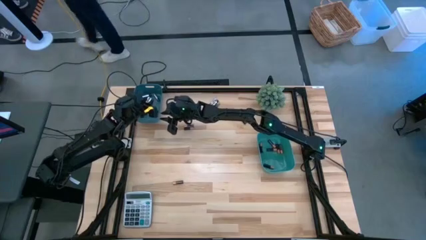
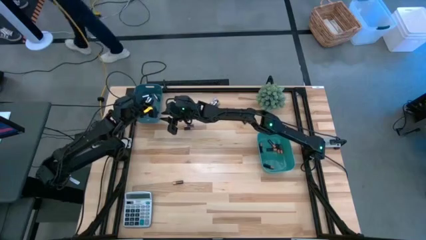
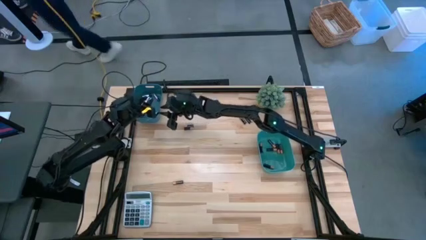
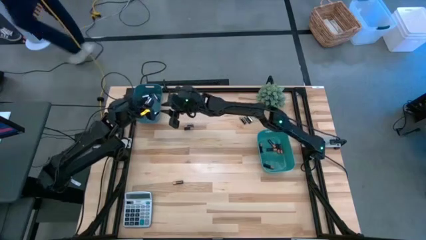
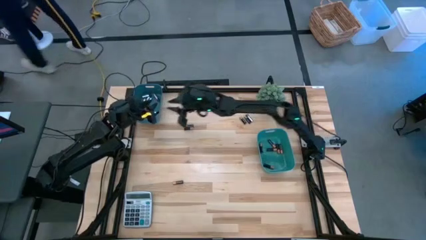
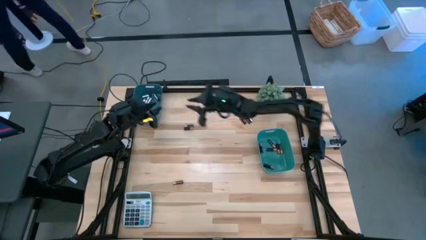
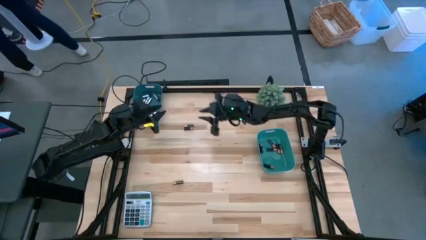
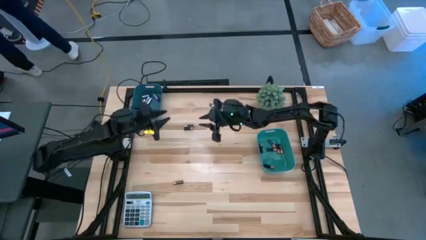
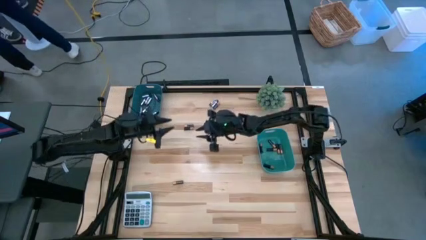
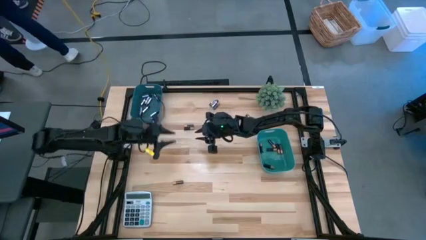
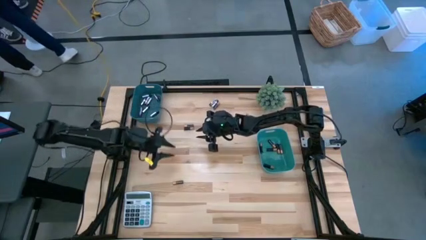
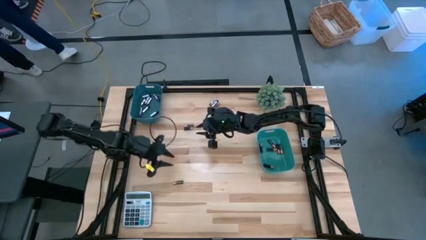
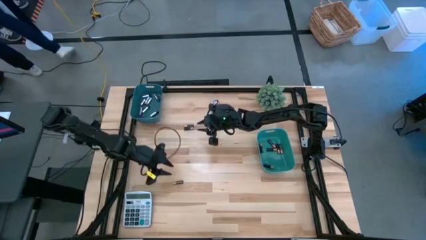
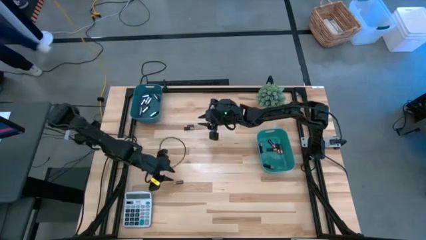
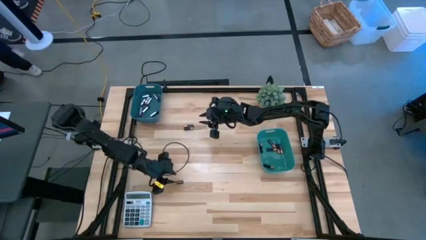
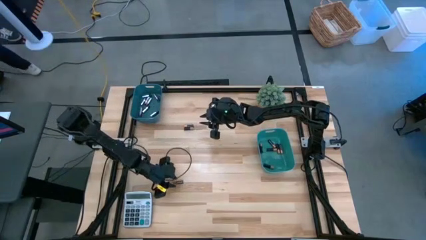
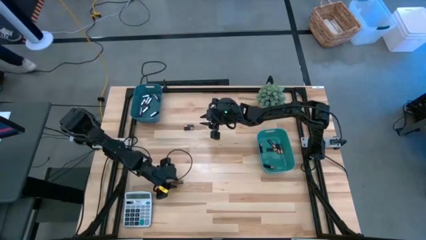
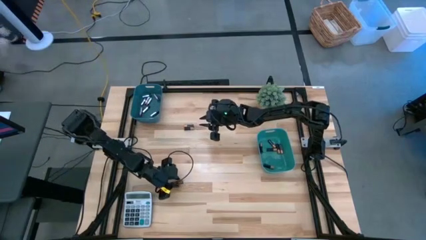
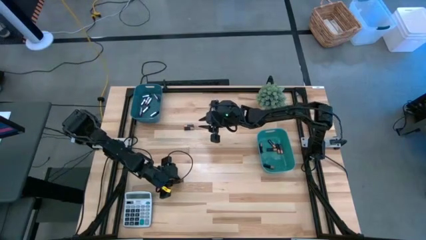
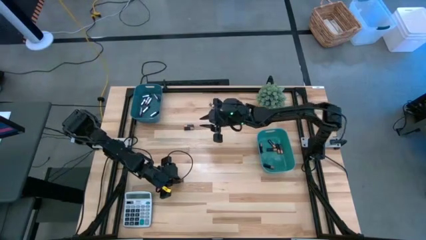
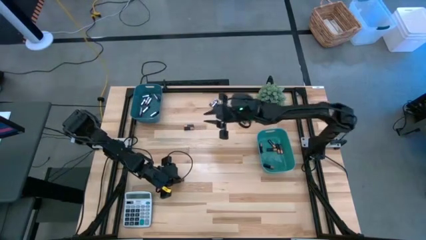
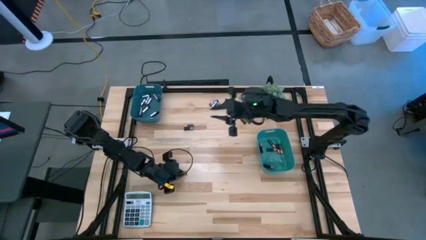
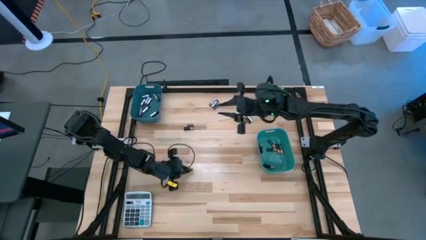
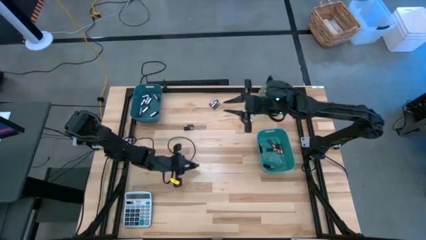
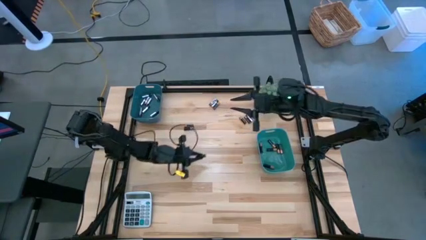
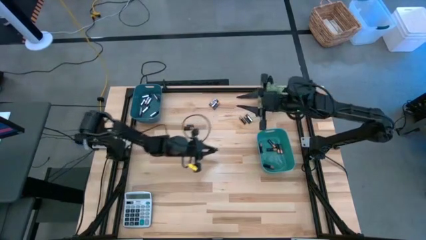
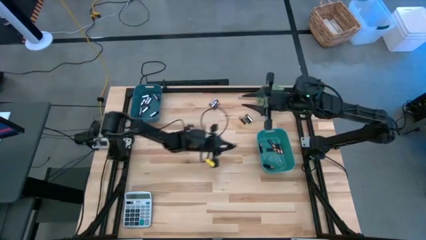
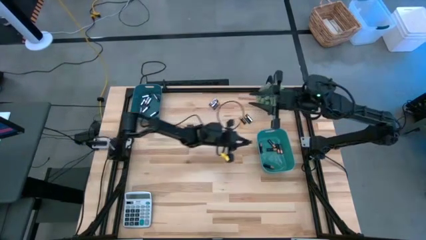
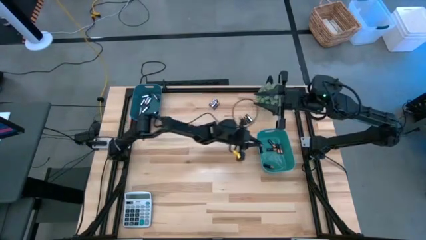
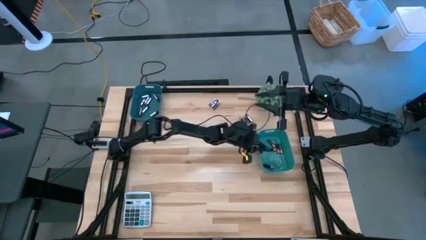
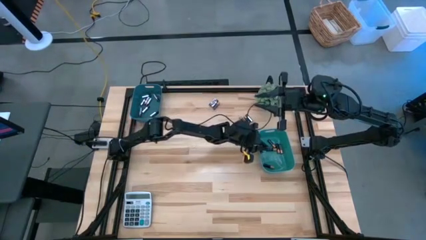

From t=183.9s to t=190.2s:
Task: Sort batteries
Put the brown-block battery into the green bin

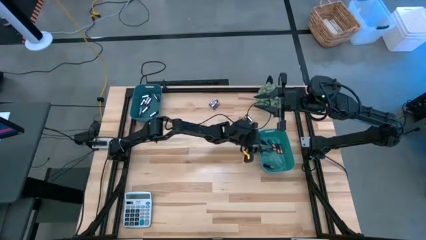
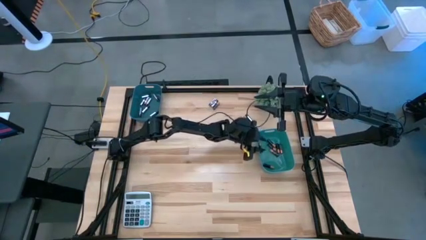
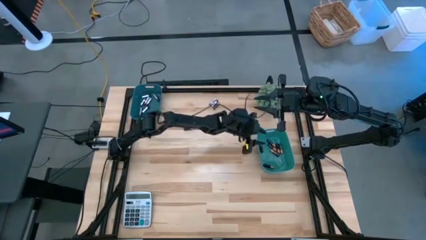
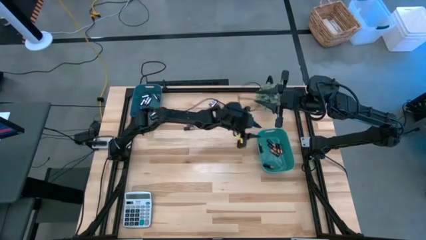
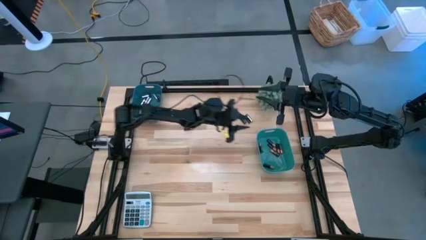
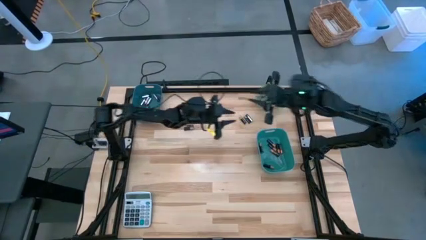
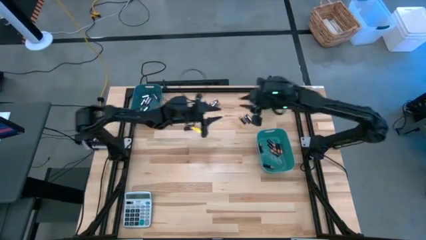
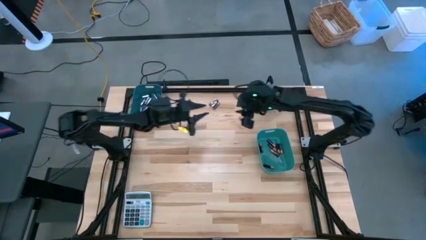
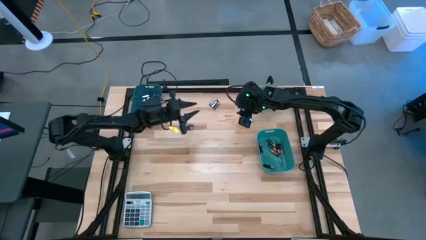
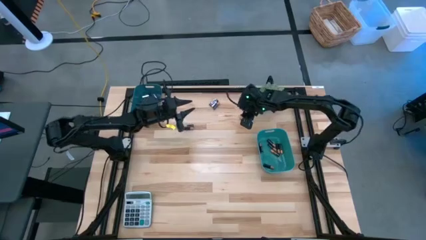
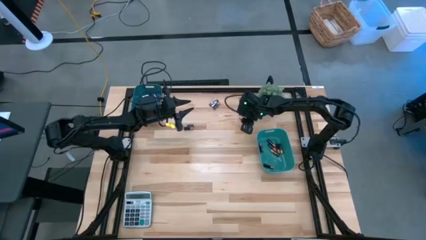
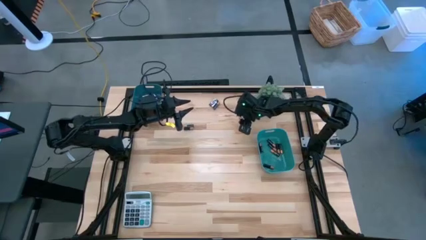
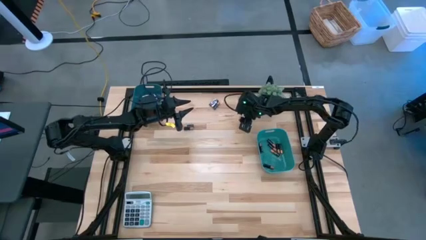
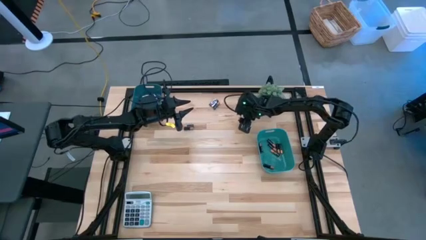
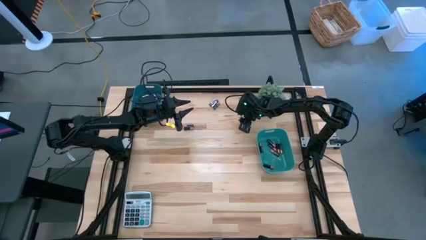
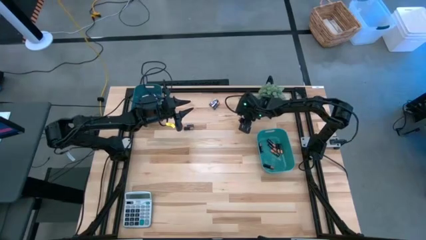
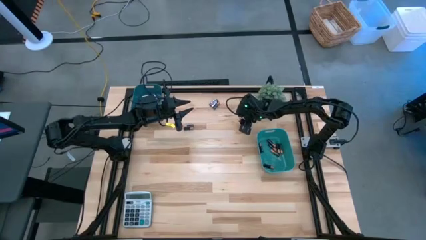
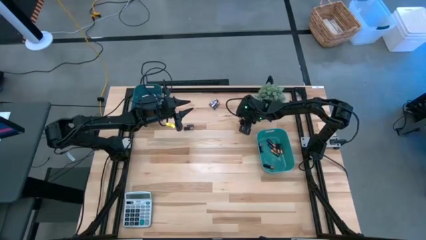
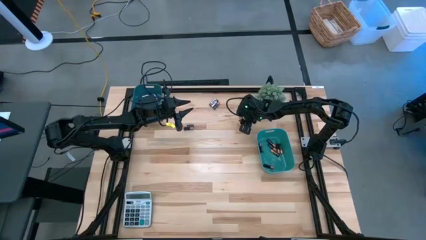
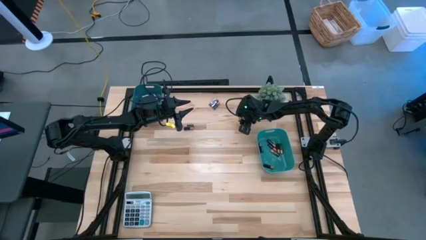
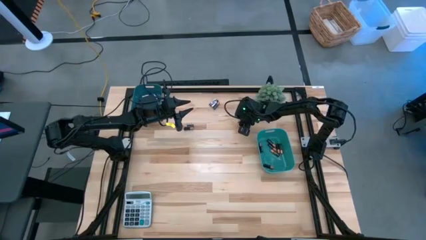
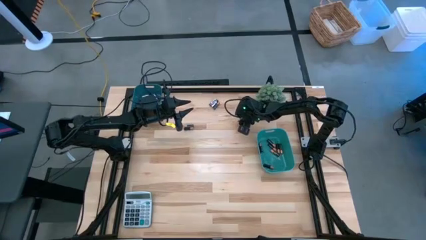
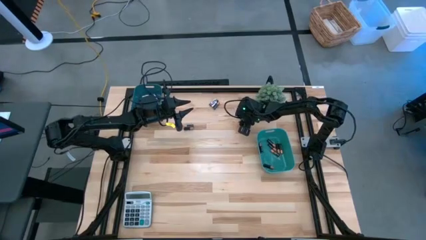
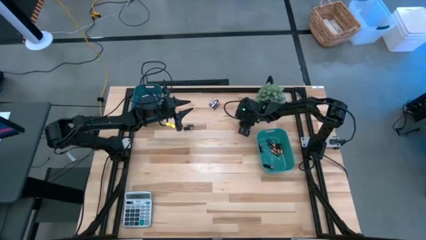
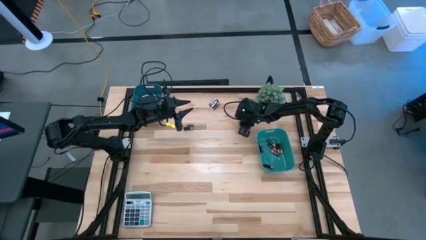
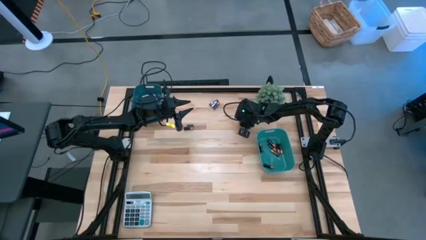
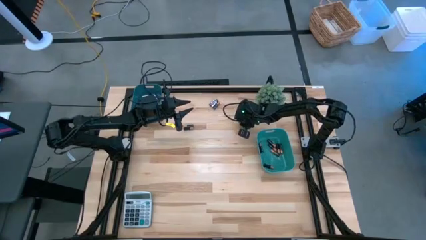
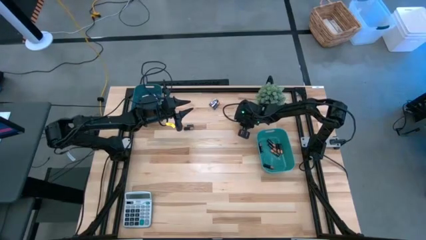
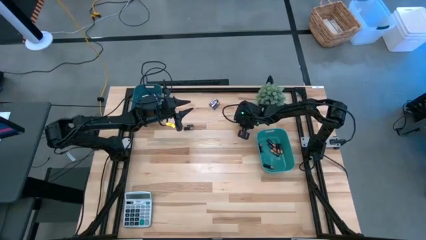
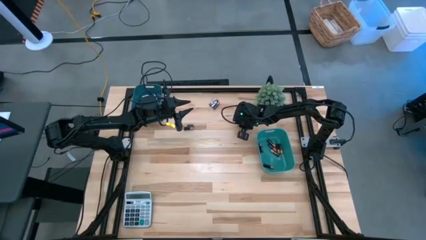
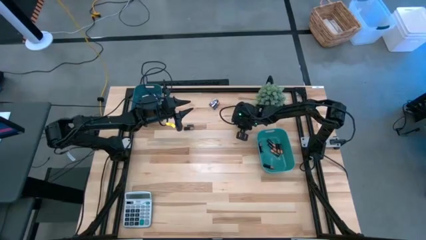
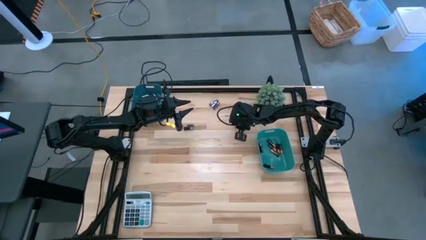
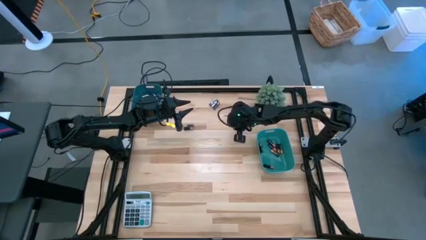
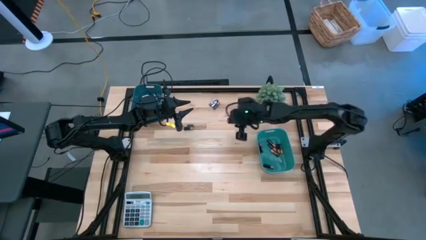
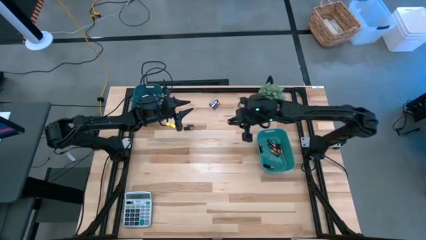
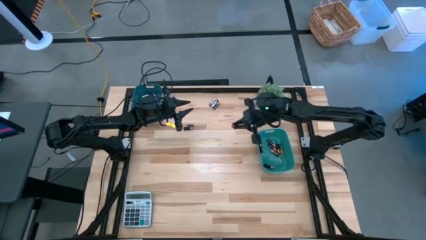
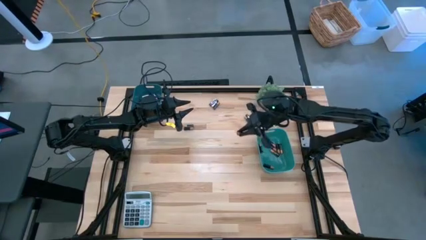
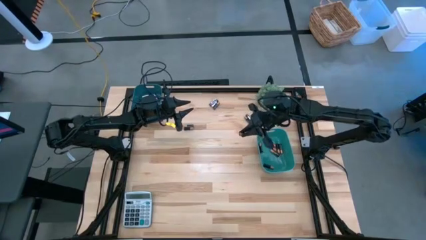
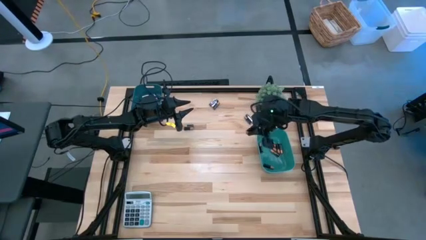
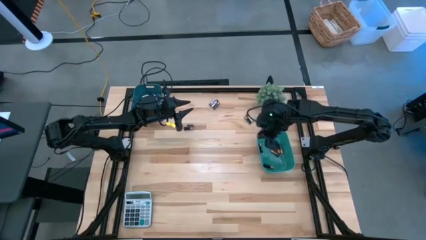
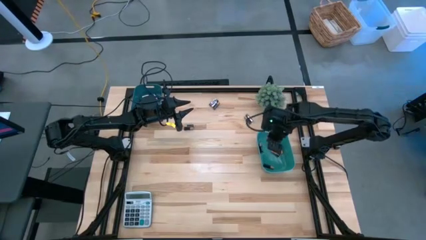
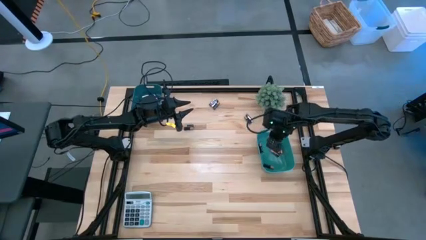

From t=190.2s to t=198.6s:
Put the brown-block battery into the green bin
